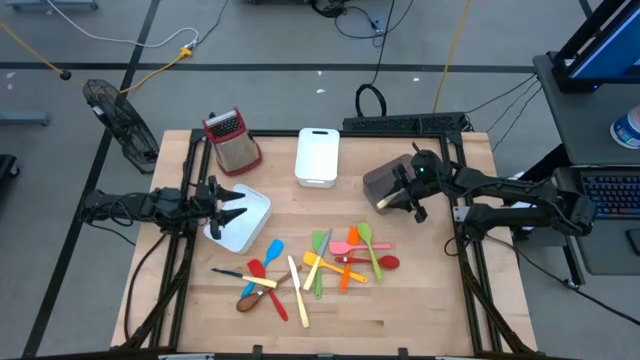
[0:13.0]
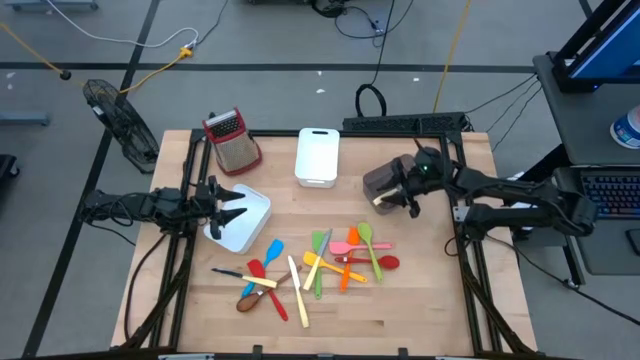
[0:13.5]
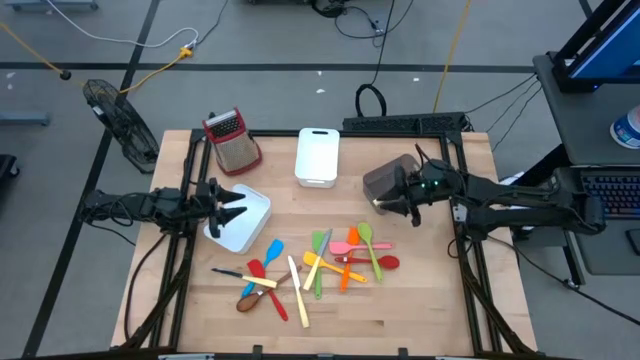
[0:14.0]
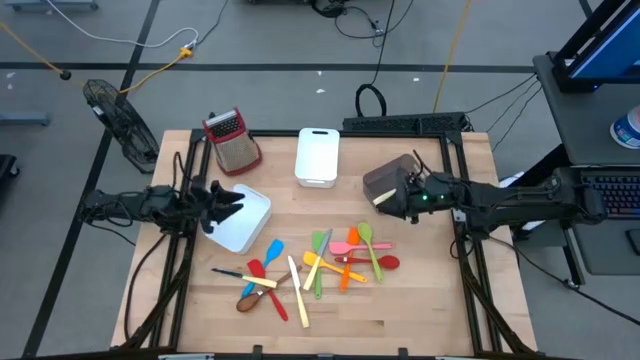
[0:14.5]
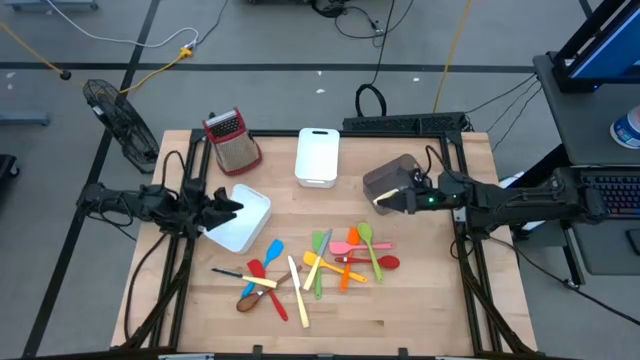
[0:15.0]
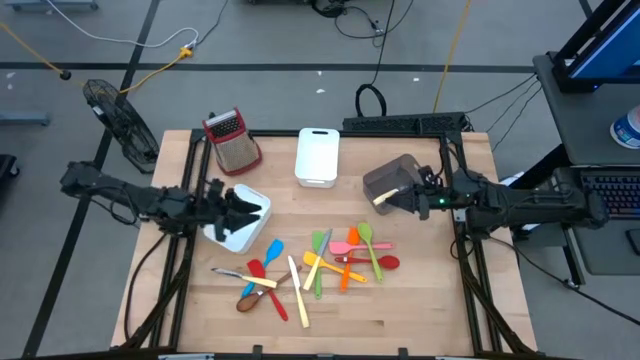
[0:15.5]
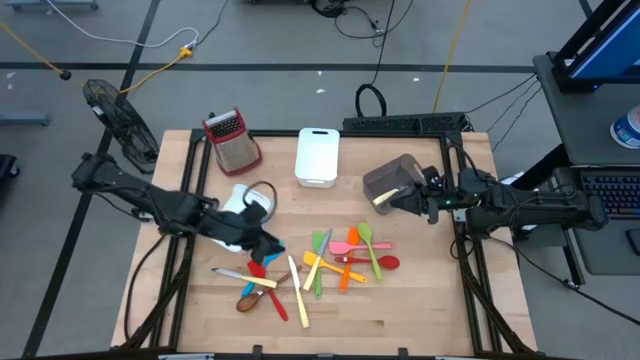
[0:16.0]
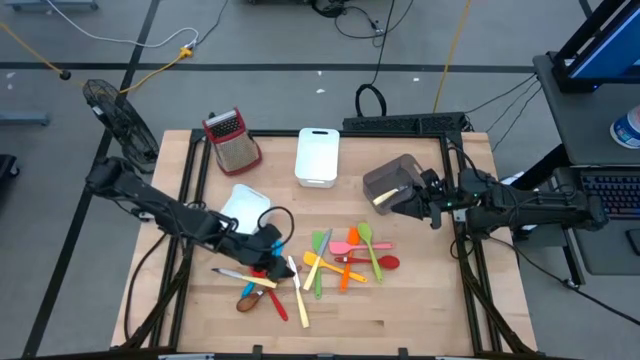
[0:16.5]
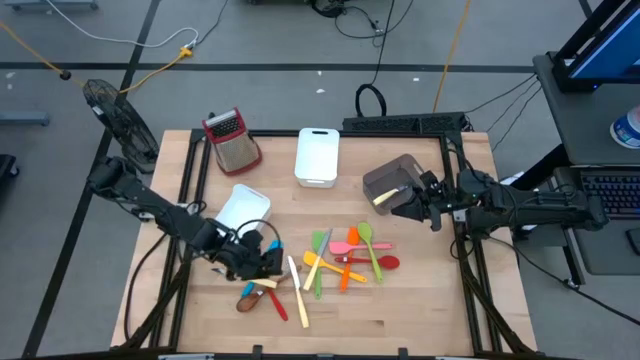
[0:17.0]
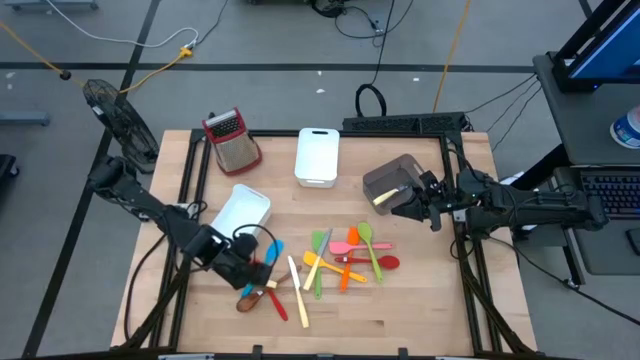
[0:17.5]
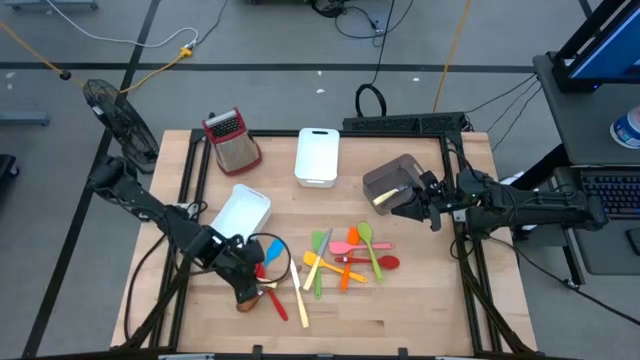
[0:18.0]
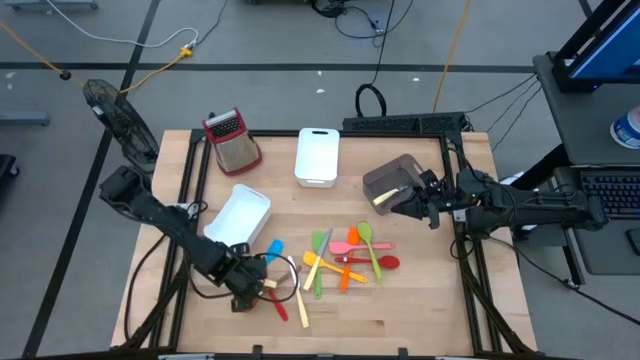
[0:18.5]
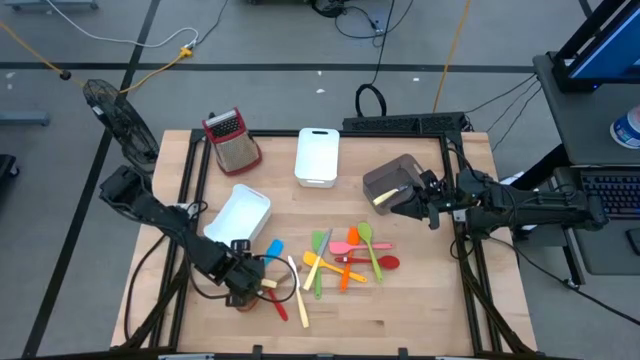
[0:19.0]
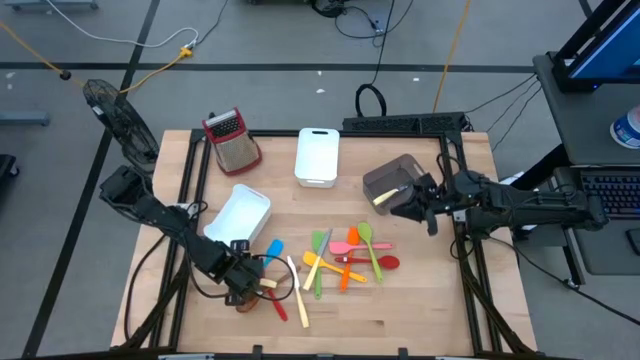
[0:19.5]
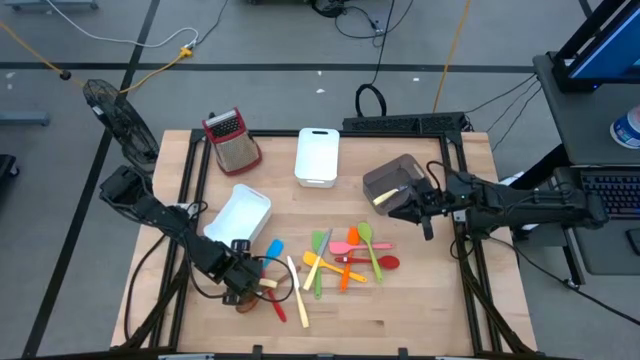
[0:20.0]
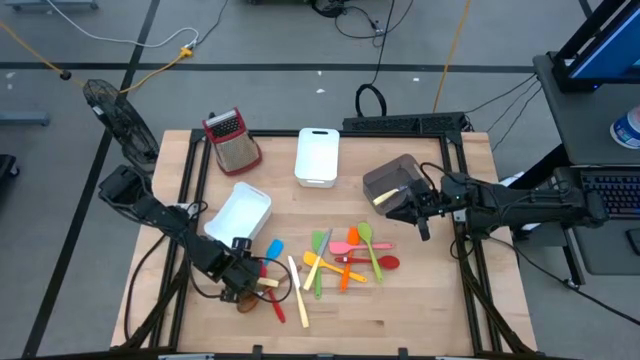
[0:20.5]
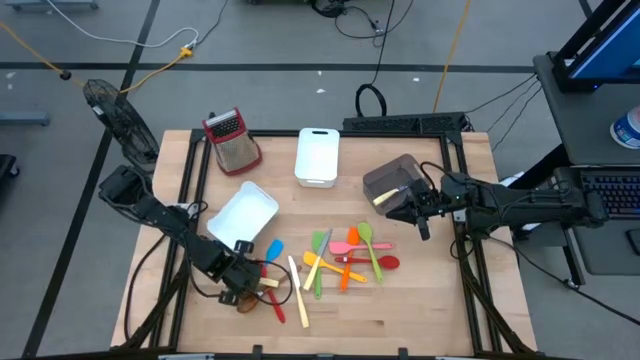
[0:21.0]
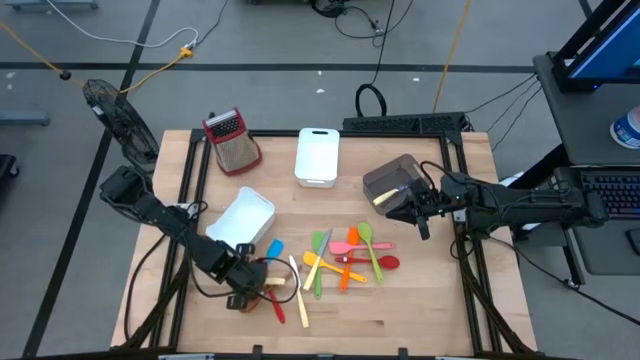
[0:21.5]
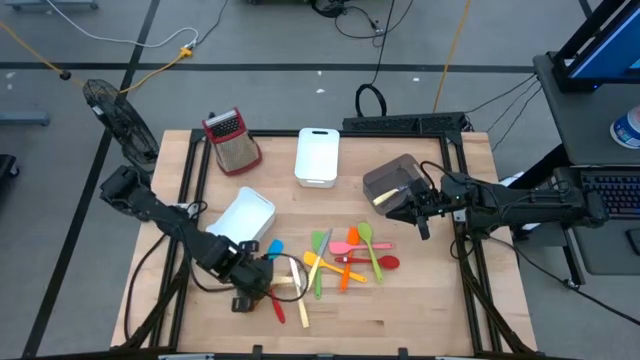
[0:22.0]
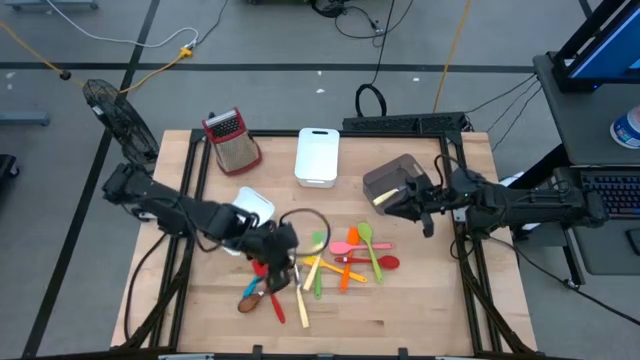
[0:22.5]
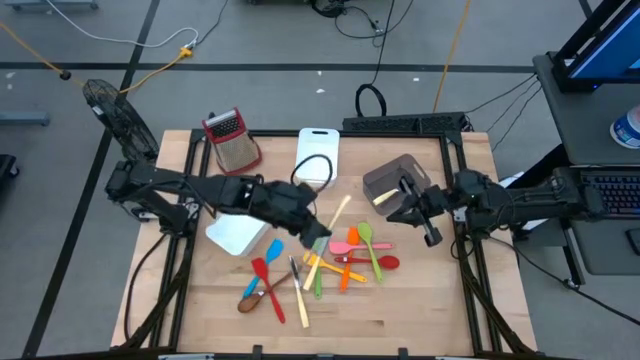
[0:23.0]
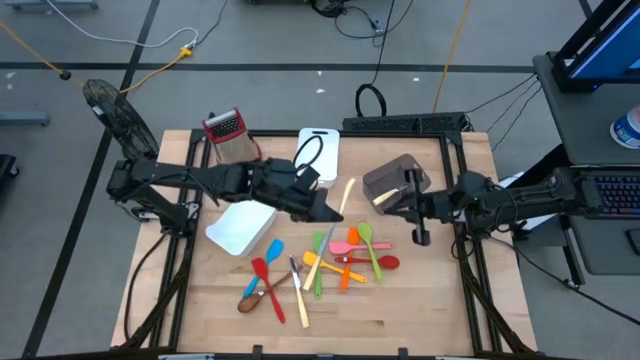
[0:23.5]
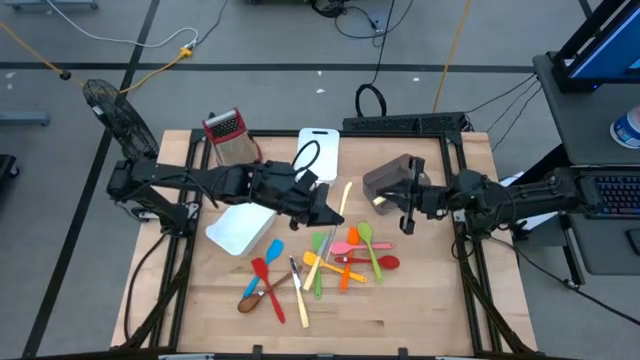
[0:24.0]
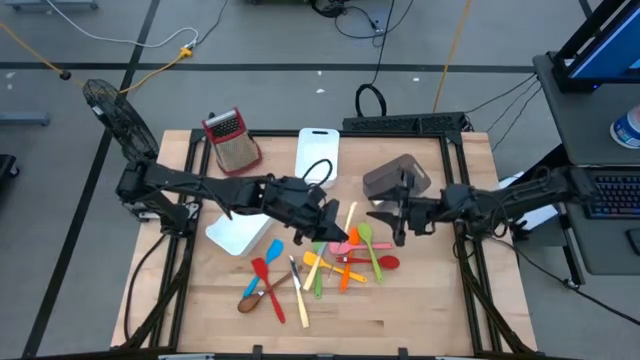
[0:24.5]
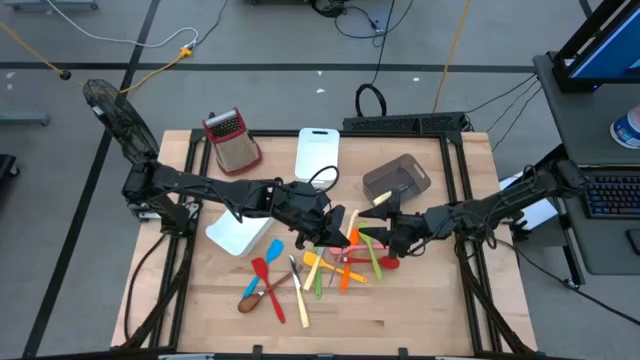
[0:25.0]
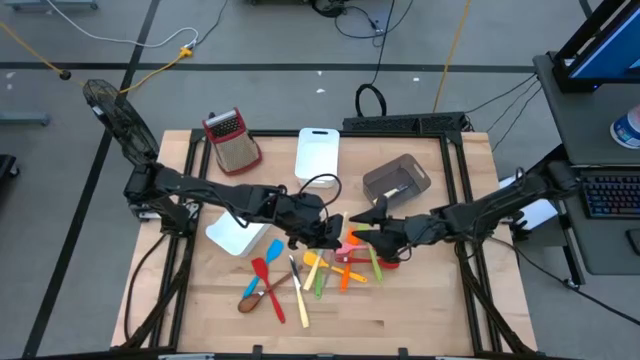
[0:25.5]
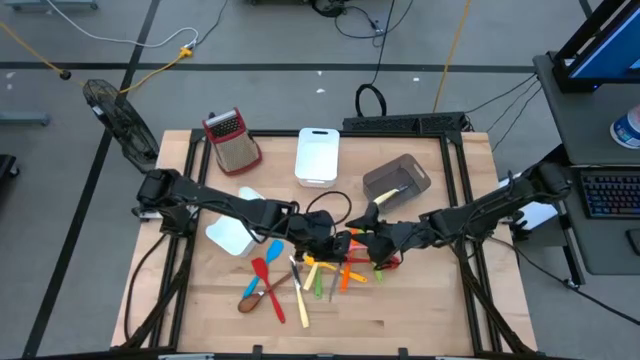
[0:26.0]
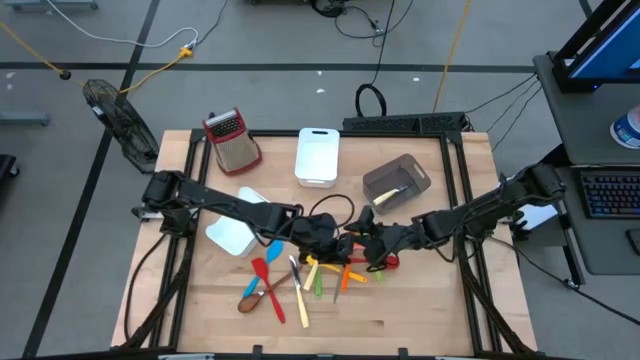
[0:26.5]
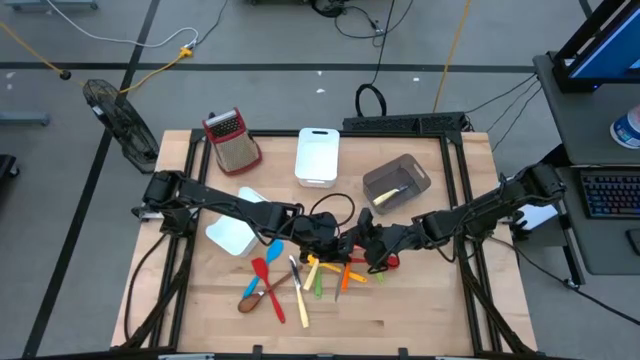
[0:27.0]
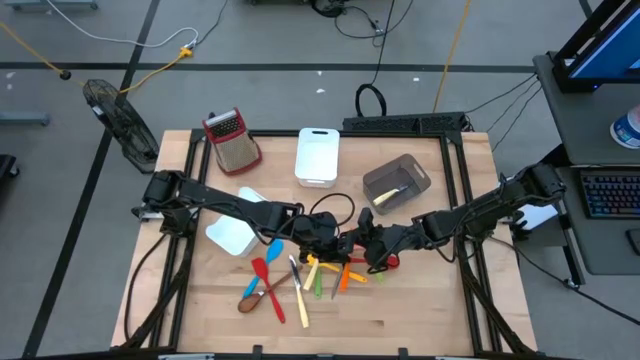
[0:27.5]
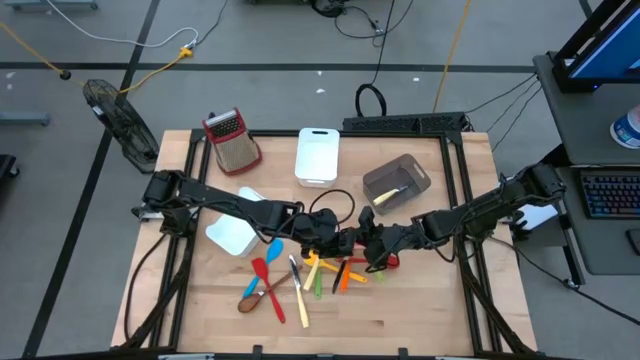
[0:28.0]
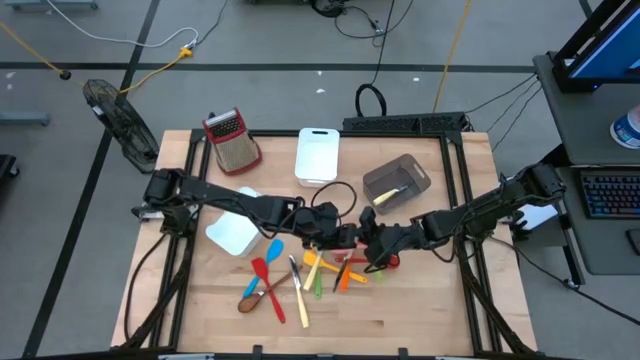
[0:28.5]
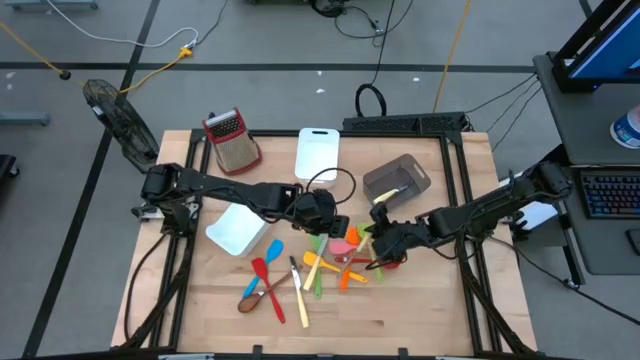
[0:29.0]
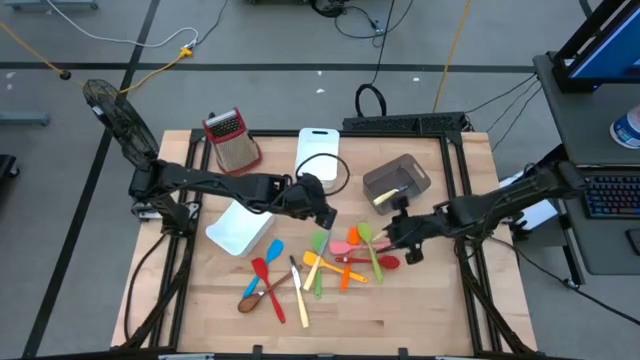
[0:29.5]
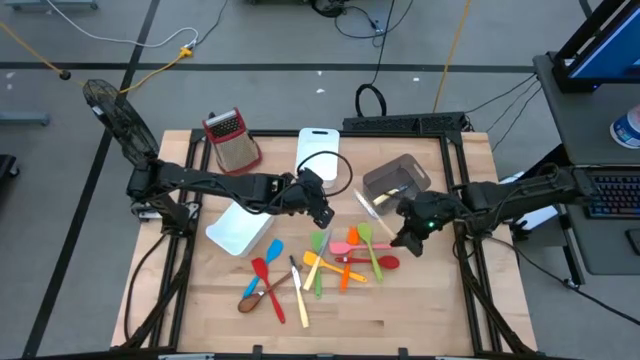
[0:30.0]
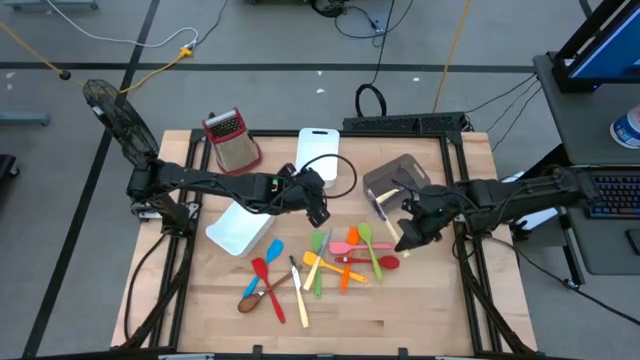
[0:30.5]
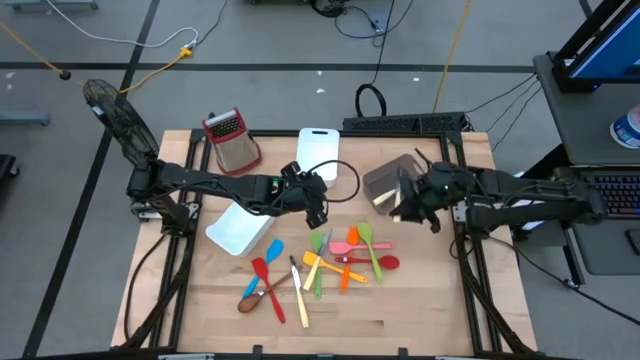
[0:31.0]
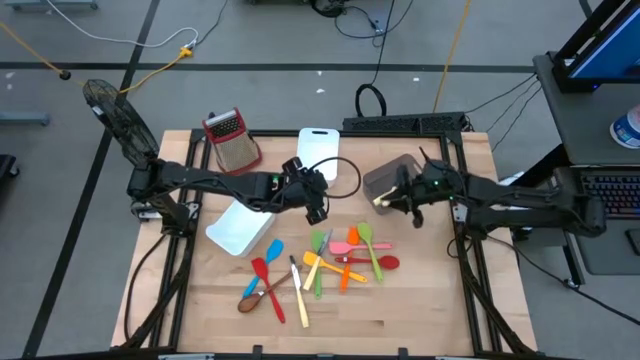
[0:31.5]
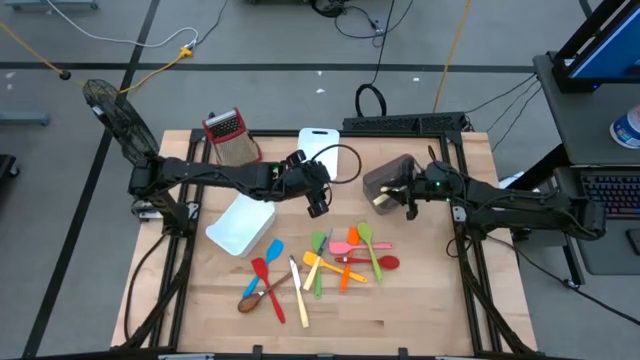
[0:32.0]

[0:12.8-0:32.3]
Task: Pick & Place Kitchen Items
Put the yellow table knife into the black bin
